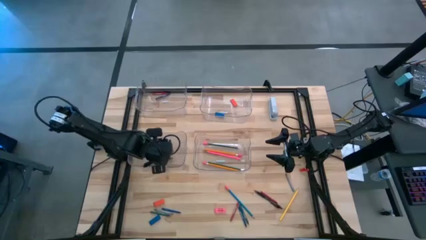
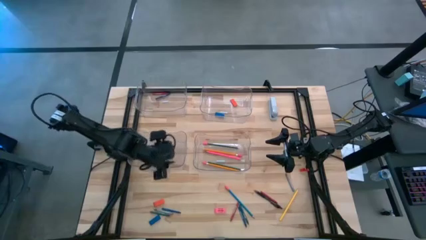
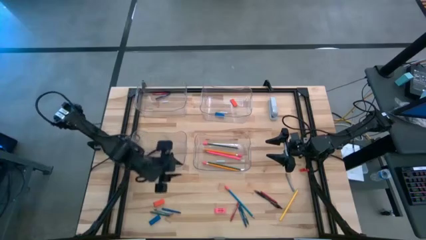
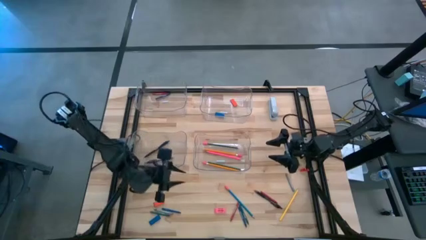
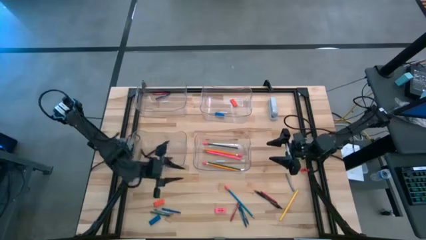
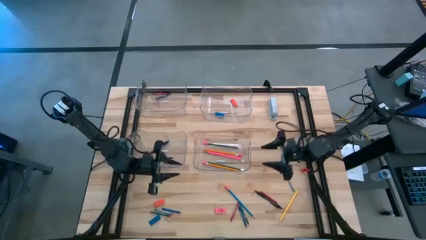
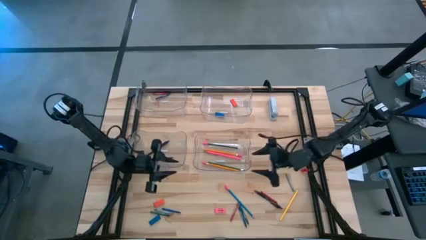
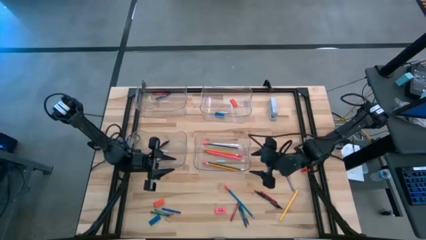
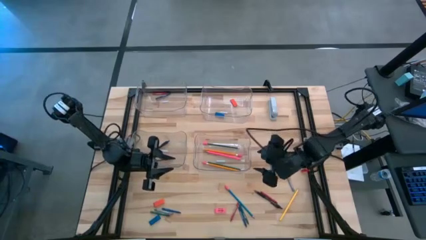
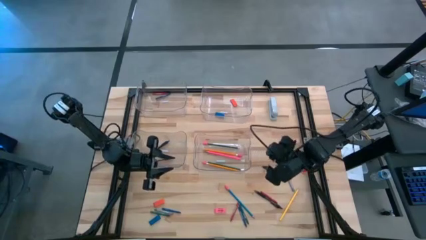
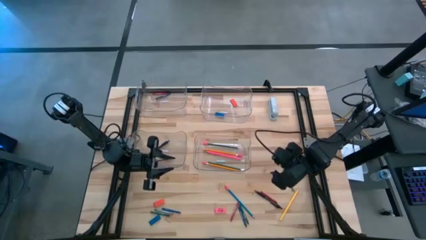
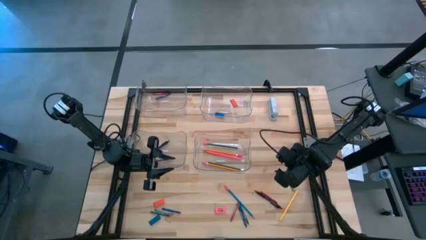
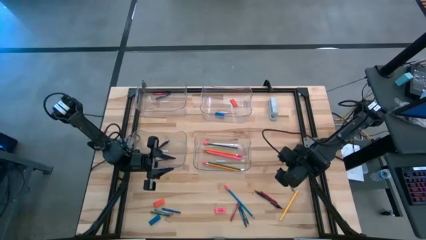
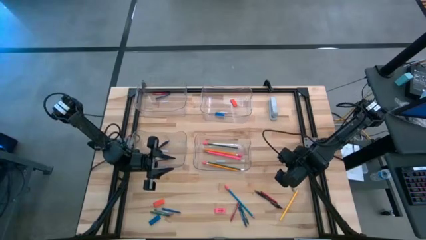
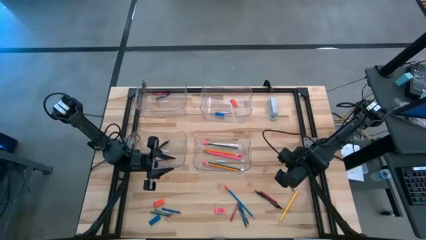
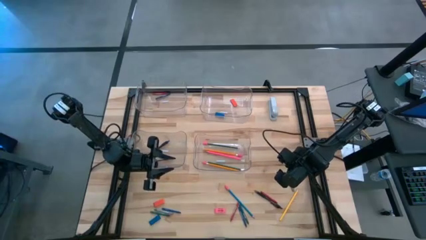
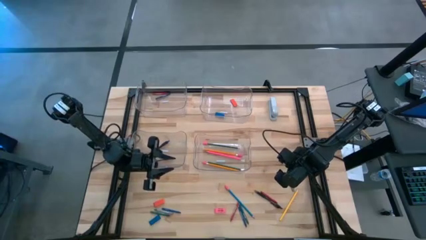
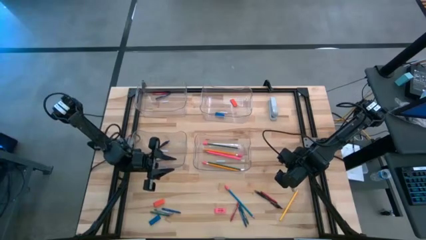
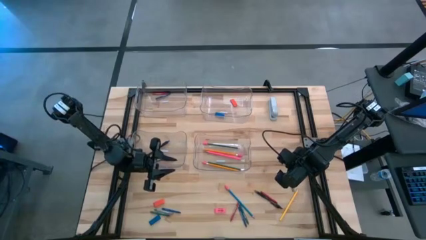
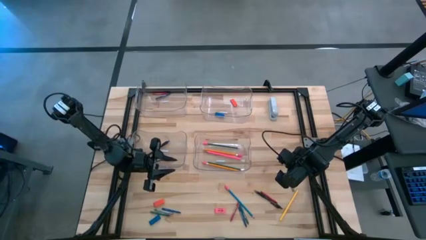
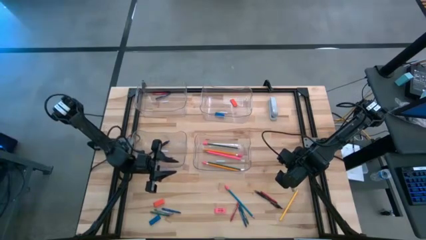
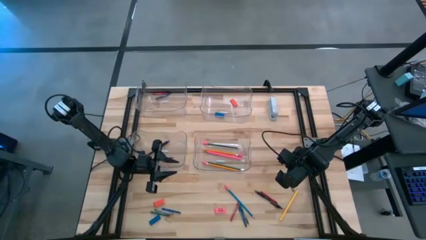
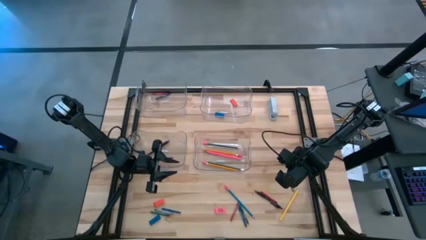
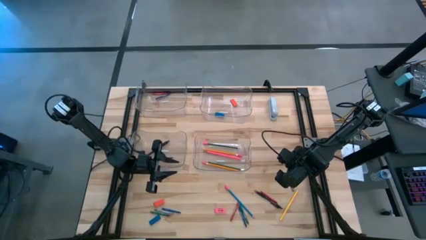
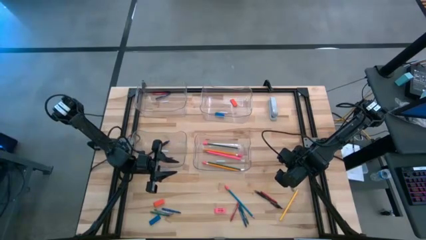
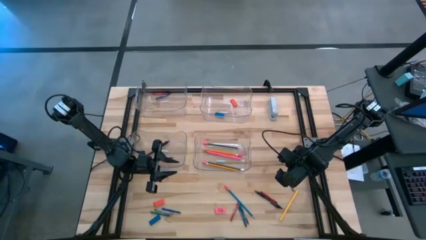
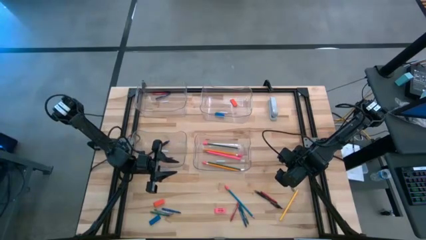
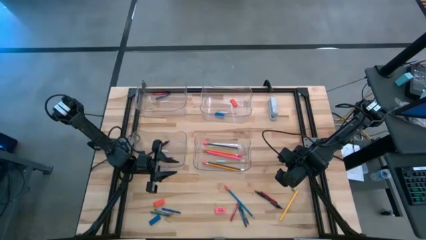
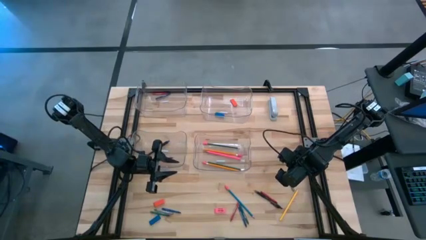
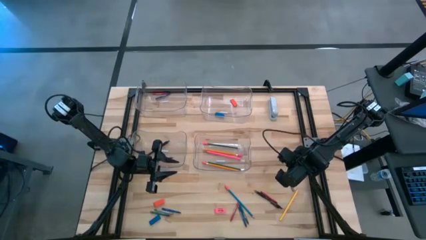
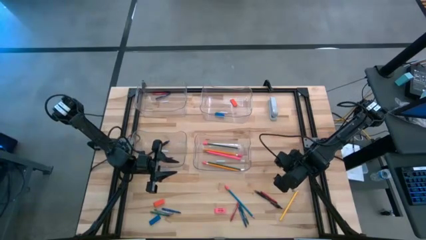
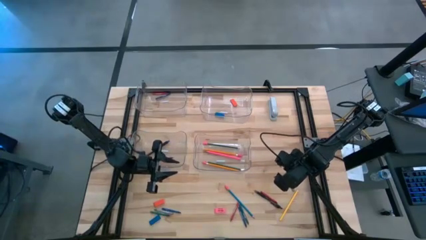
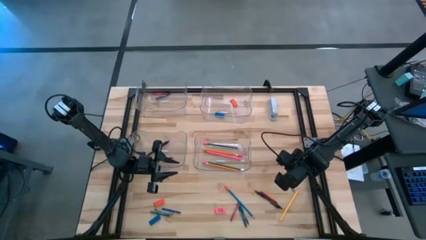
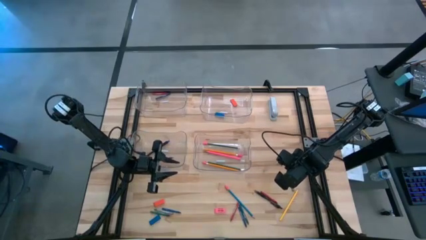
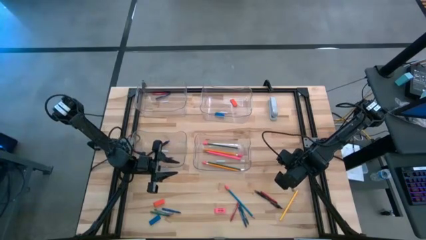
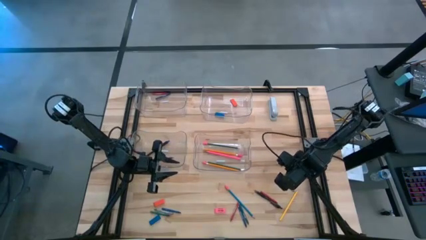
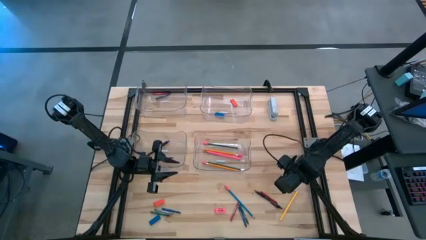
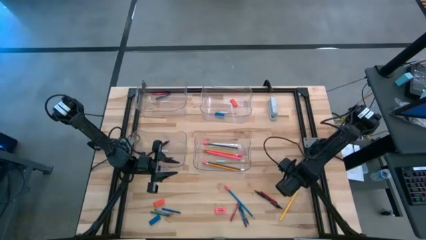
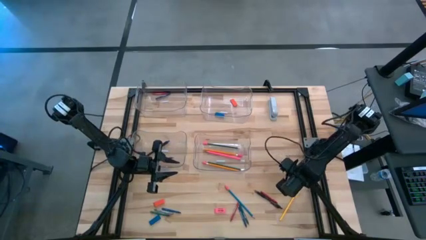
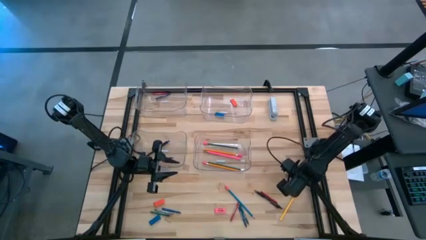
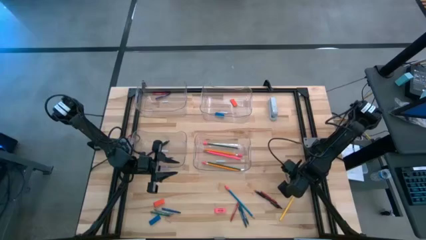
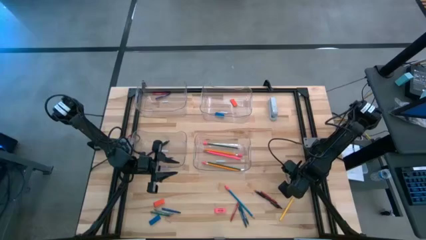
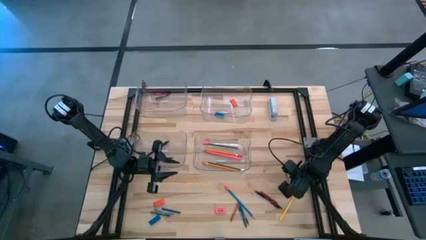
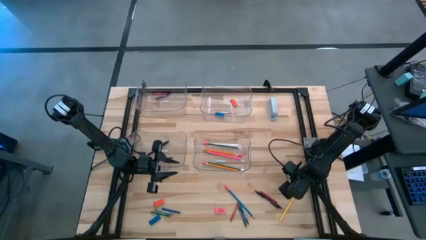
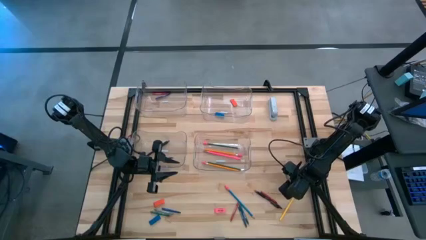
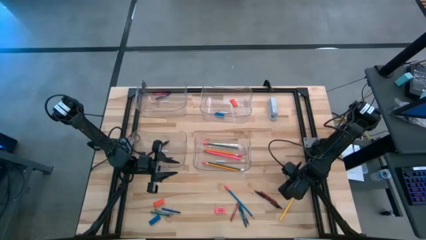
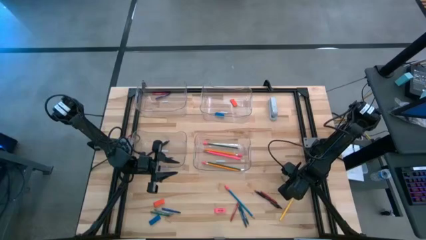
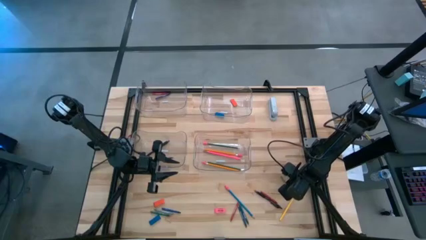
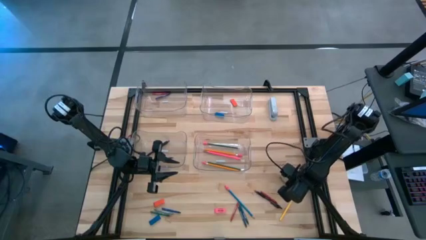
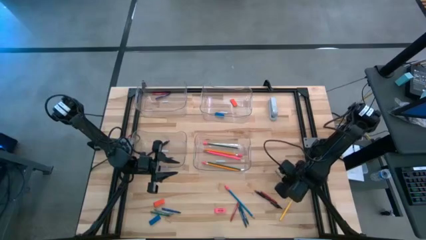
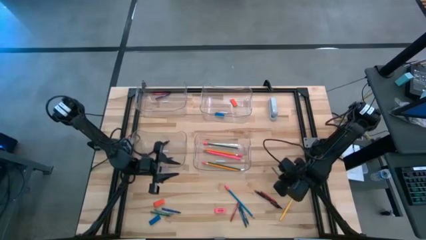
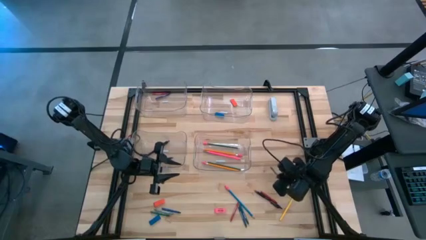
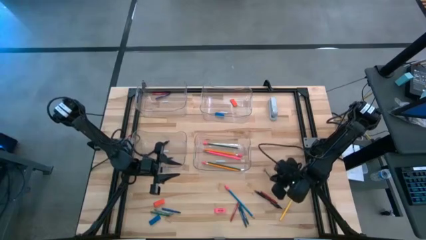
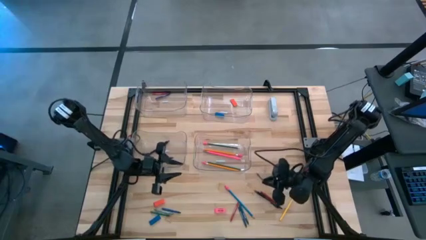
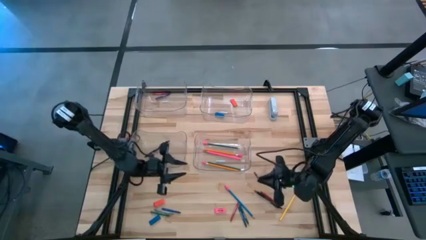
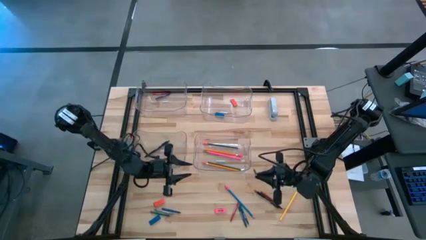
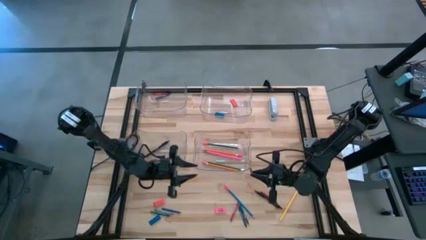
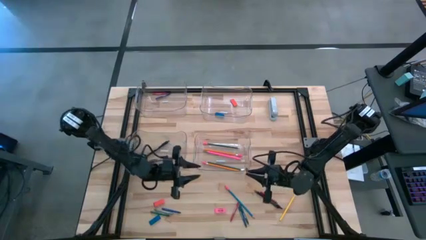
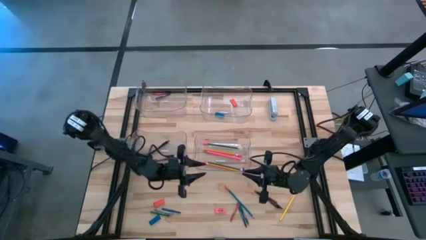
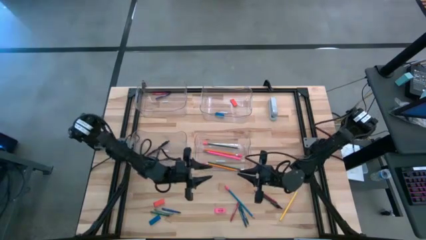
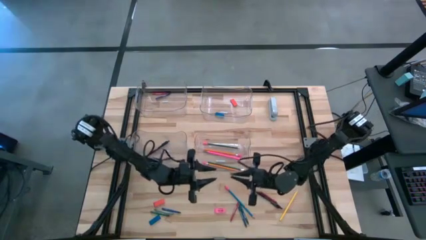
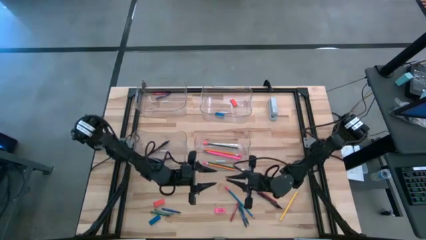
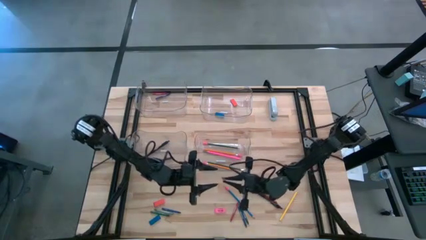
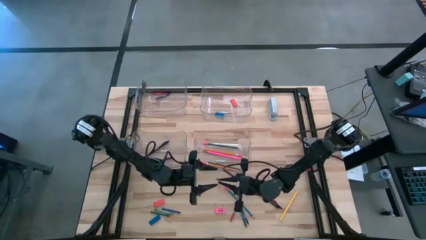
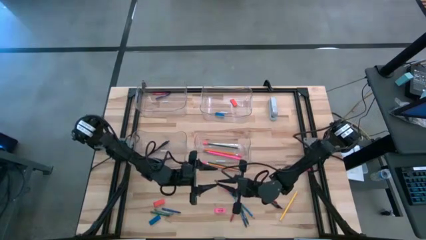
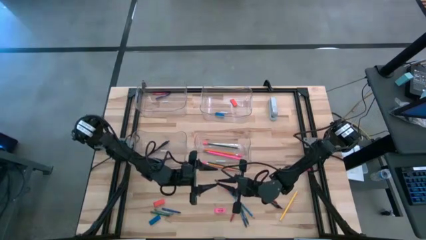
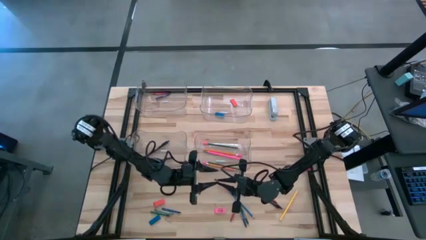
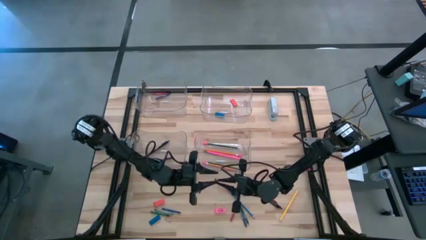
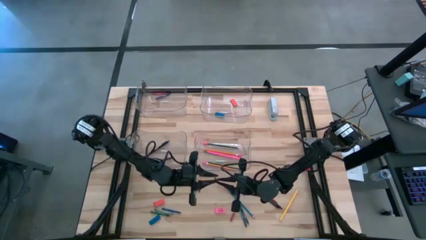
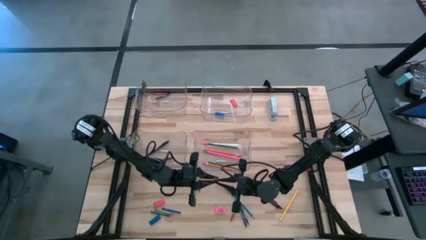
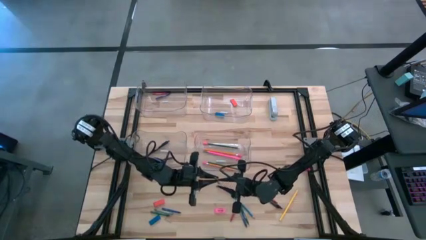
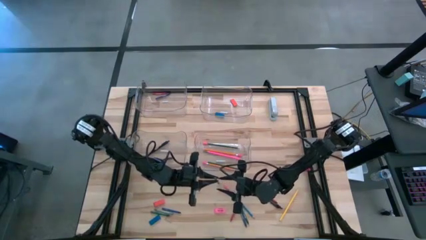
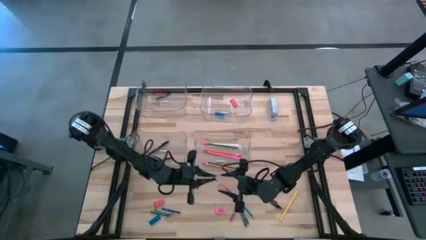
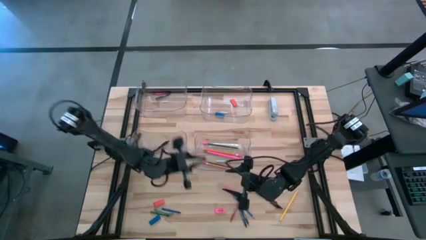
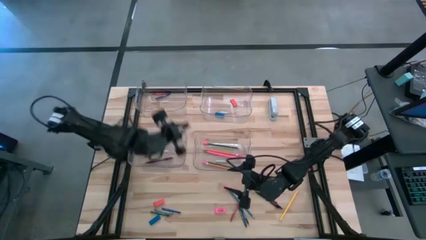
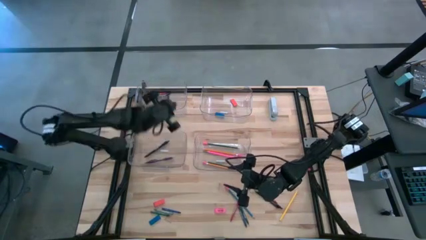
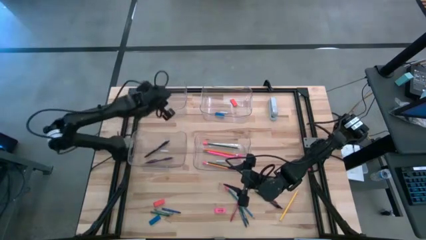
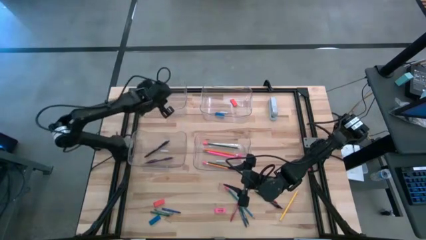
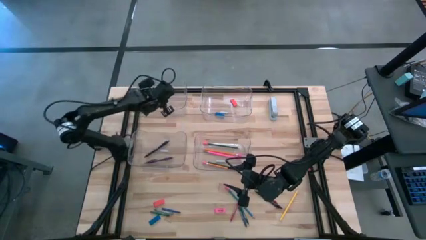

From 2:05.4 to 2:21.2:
Task: Sort crayons/erasers/pens/pencils in bins
Put the top gray crayon into the top left transparent bin
